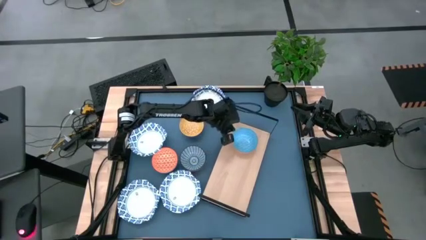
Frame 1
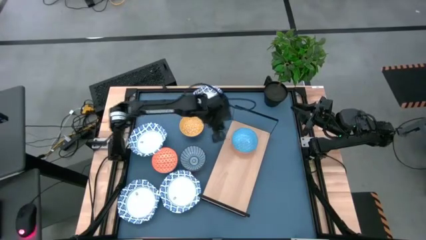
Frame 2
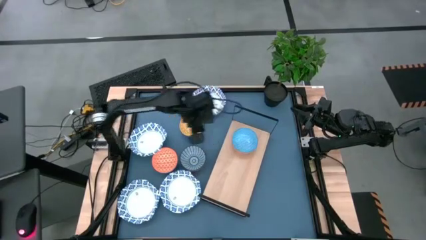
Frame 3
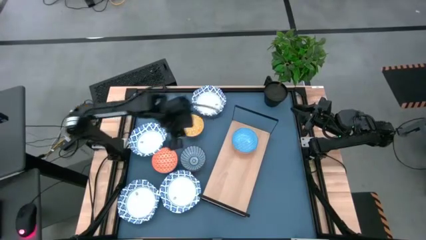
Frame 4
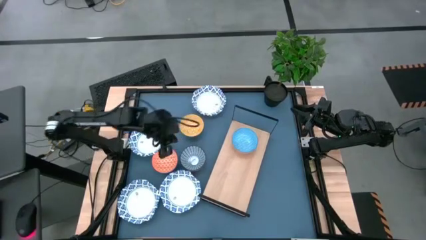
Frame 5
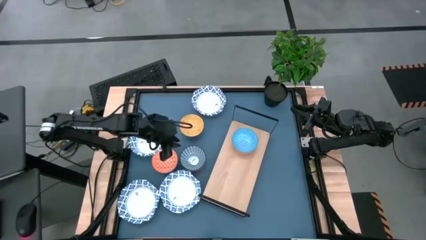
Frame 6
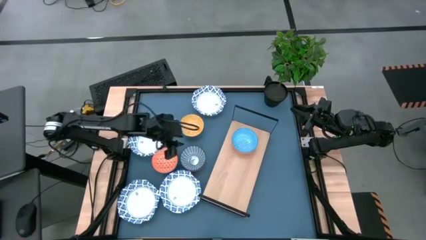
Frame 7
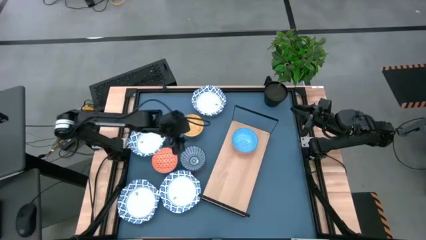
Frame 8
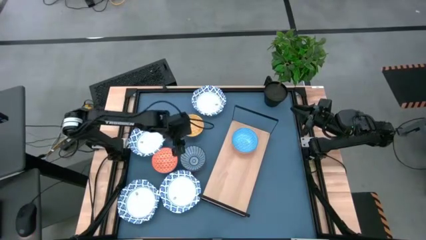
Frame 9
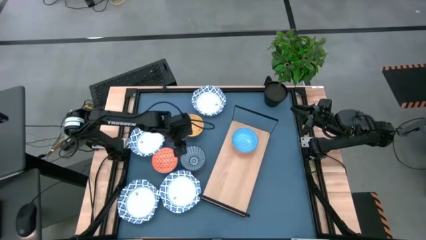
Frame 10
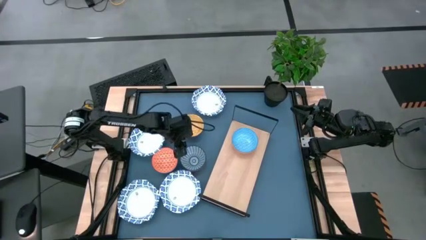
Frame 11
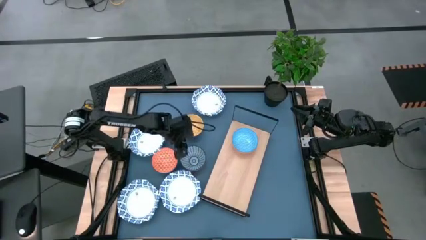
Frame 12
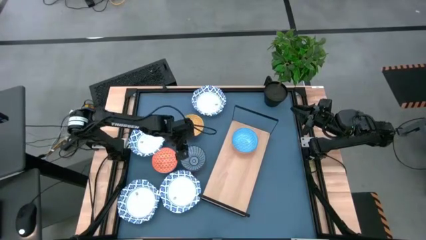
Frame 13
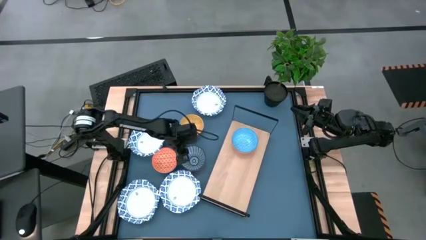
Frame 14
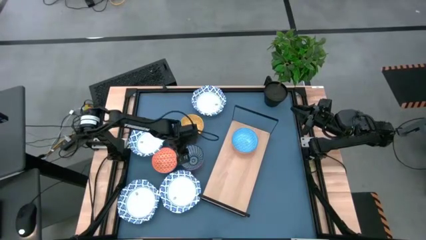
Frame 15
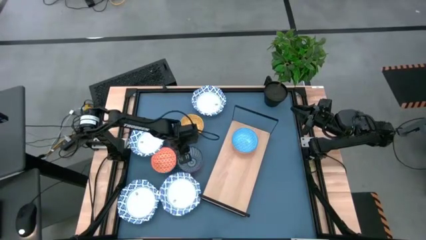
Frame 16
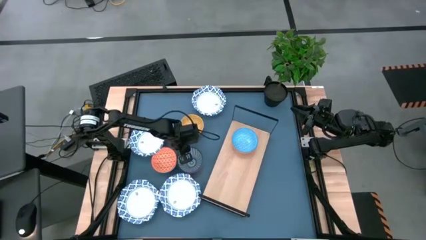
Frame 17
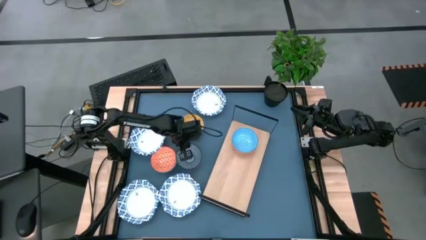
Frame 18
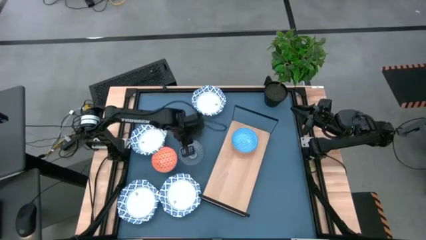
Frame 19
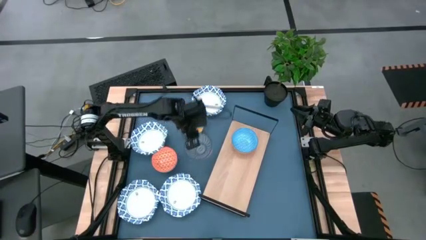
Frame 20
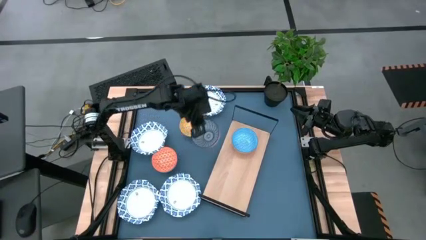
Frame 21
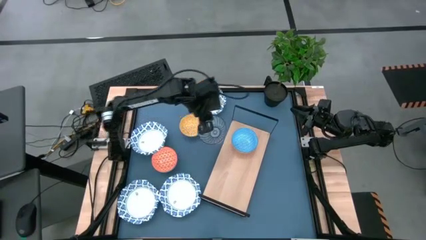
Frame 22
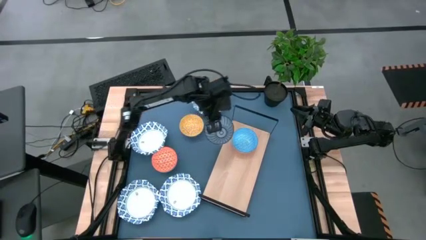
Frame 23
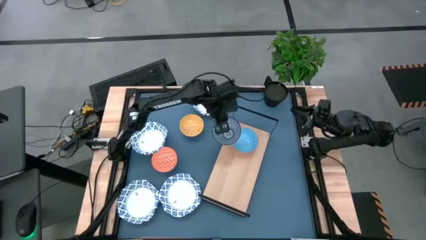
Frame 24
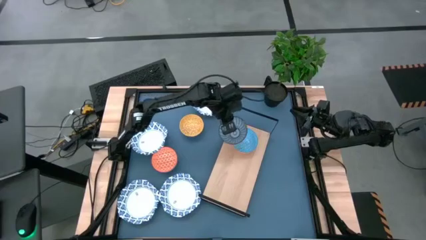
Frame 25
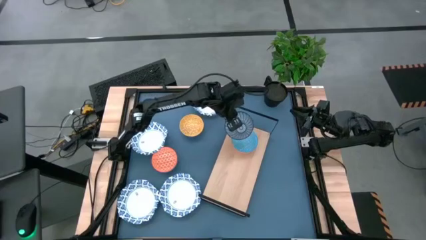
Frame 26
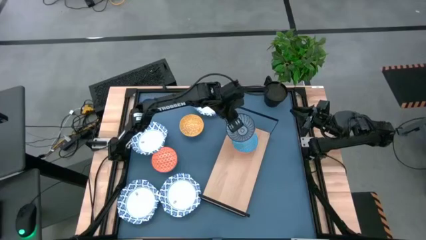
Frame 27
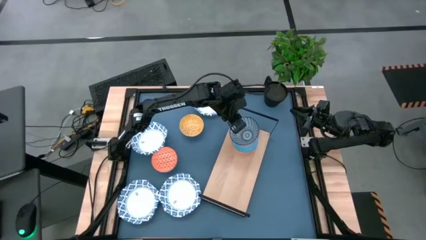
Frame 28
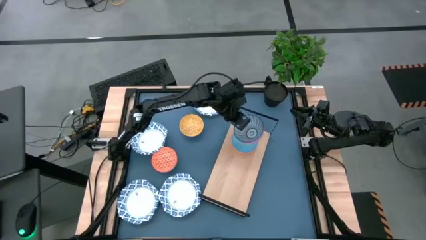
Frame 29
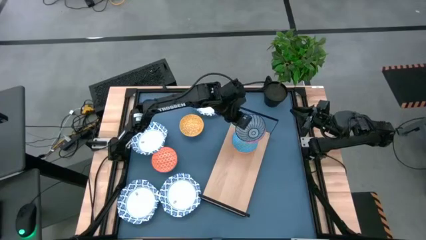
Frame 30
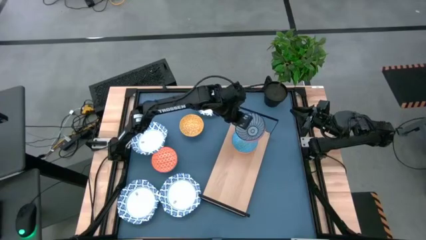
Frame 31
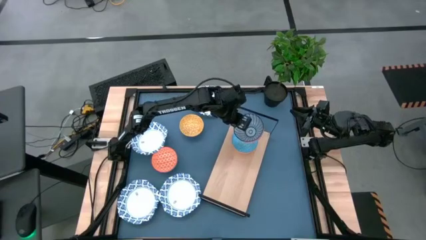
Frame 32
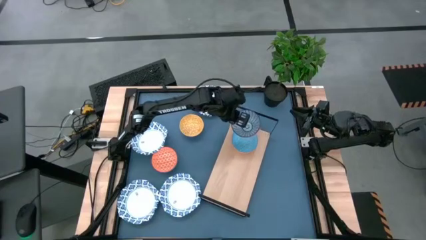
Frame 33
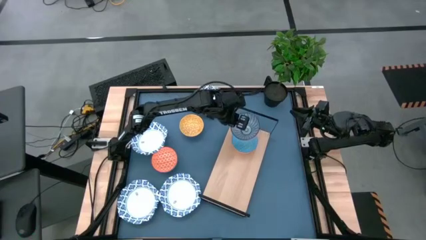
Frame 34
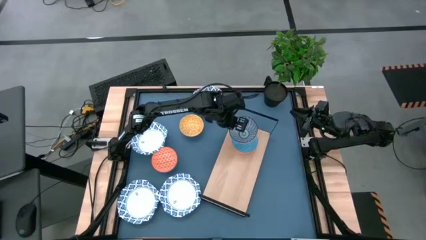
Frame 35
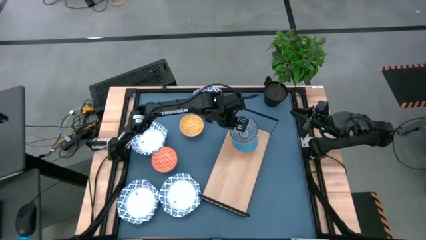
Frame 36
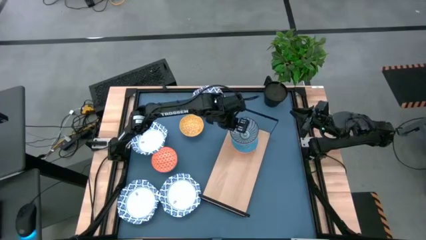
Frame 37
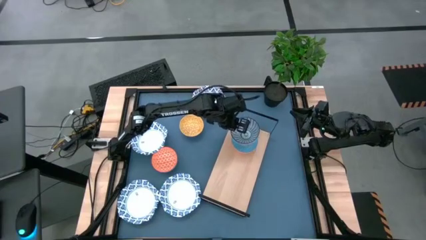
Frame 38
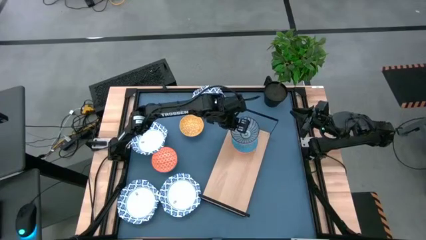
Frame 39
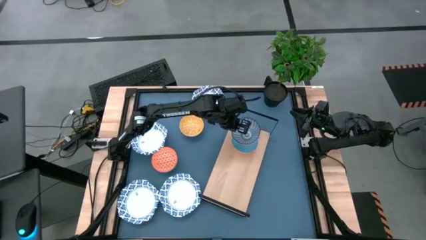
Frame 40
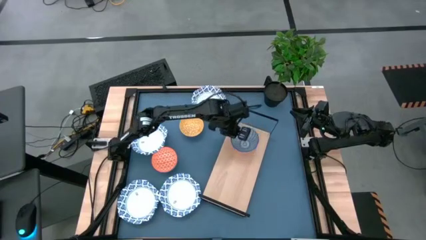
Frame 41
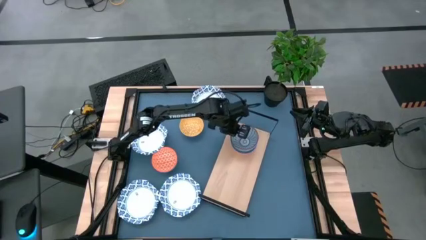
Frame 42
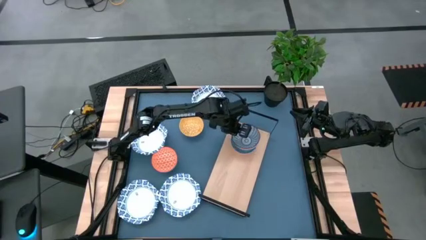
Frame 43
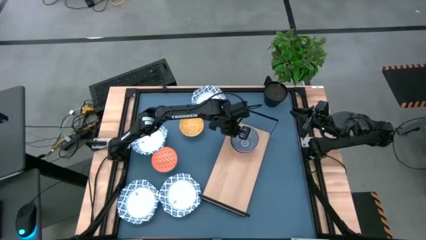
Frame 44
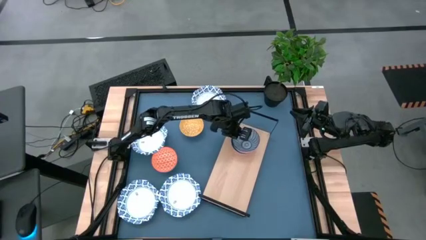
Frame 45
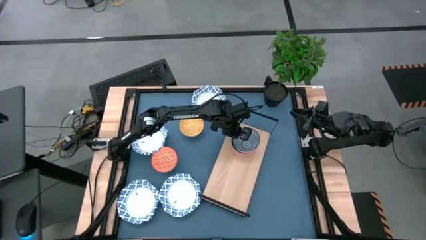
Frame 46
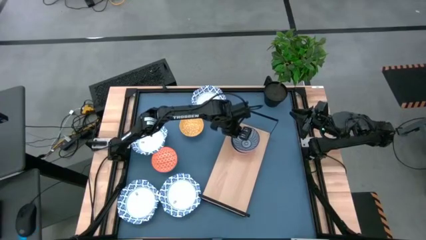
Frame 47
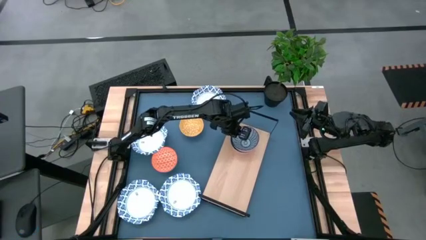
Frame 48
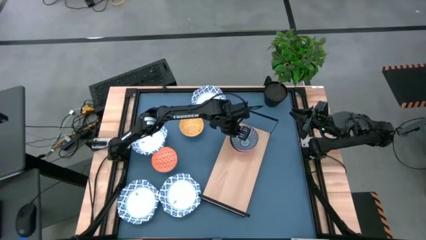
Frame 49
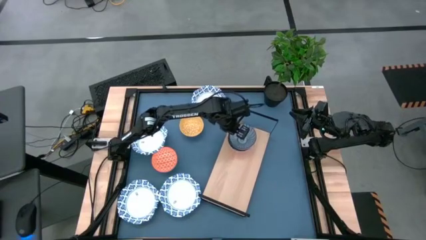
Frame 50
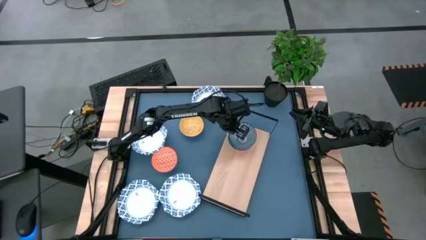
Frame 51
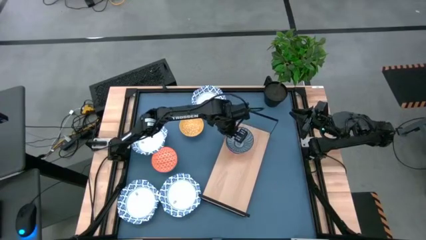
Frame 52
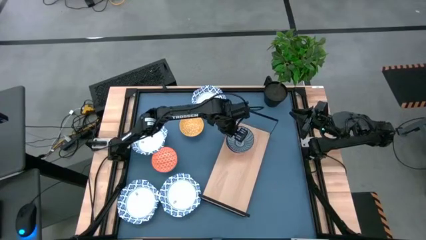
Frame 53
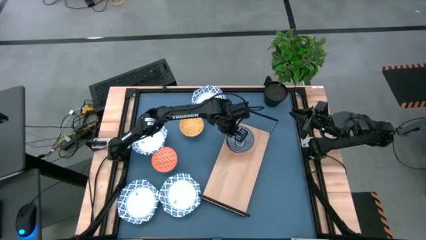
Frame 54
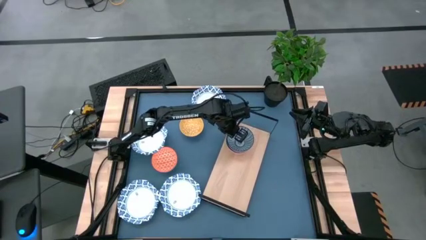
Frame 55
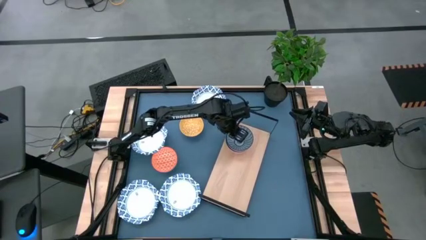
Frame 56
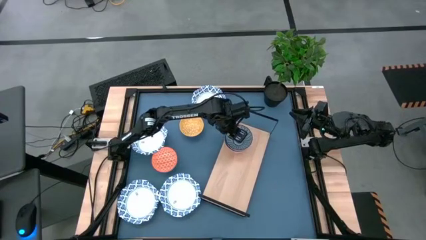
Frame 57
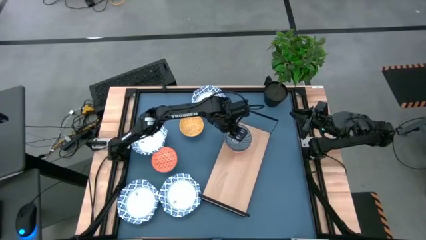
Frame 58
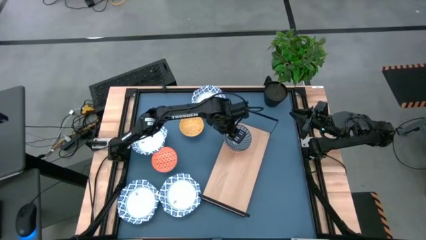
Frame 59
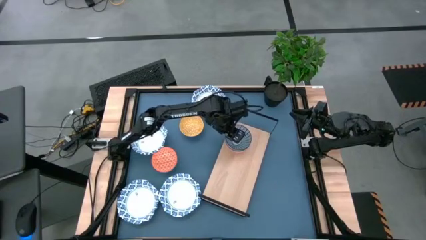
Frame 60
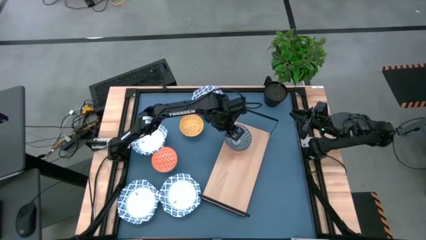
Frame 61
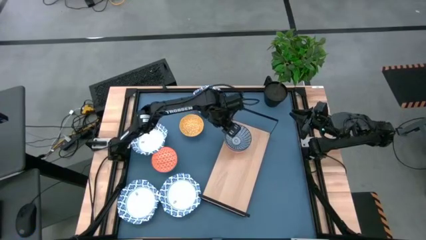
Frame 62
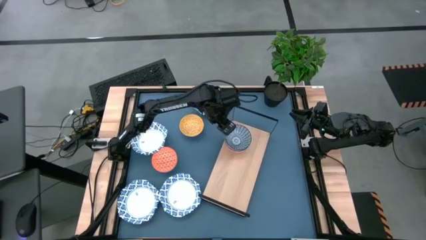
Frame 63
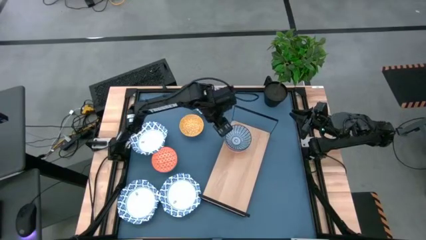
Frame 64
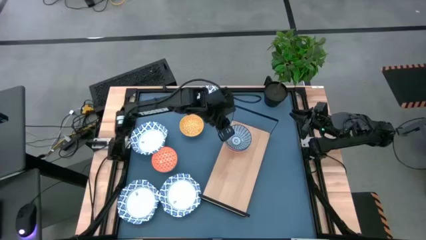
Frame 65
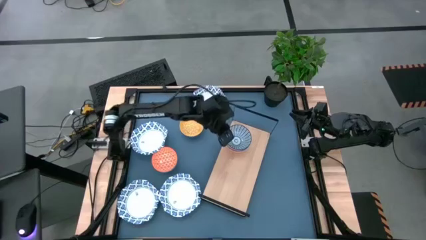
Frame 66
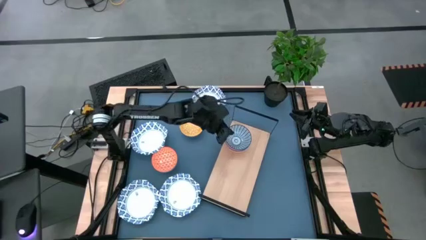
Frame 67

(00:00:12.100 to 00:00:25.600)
Task: Place and stack bowls onto a shelf
Stack the dark blue striped bowl into the light blue patterned bowl

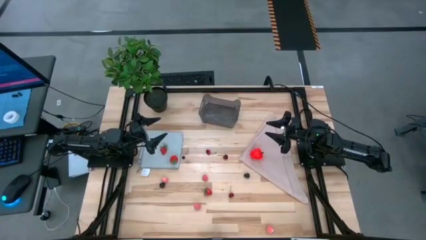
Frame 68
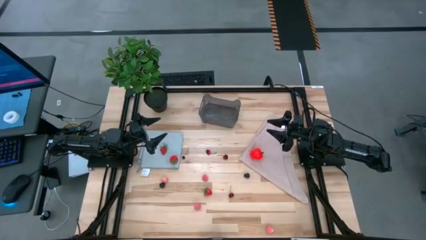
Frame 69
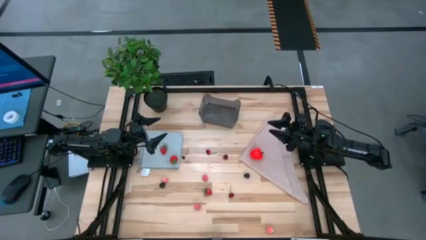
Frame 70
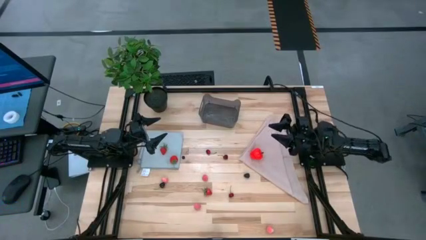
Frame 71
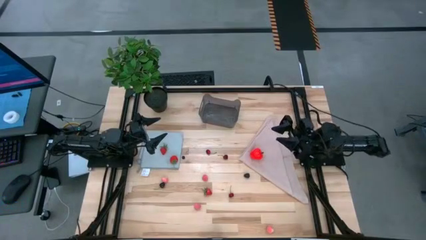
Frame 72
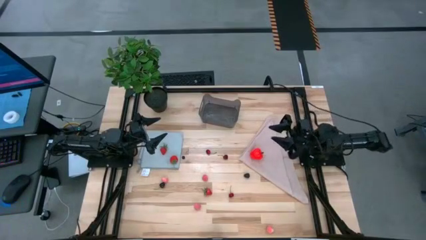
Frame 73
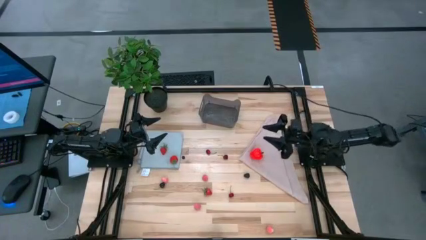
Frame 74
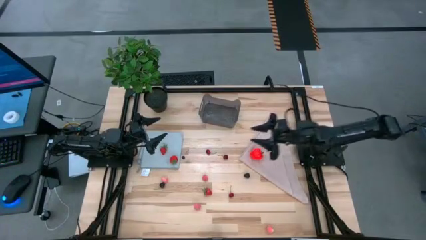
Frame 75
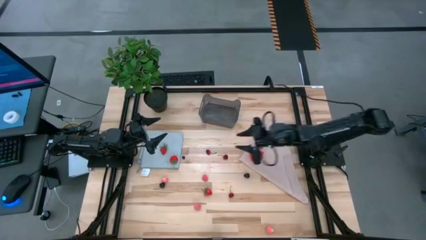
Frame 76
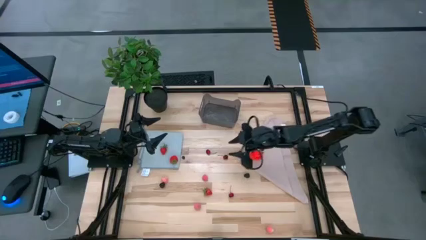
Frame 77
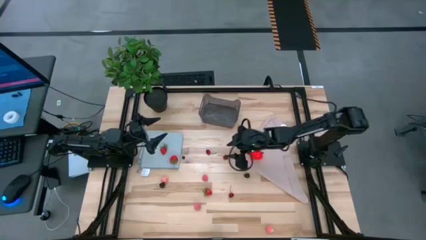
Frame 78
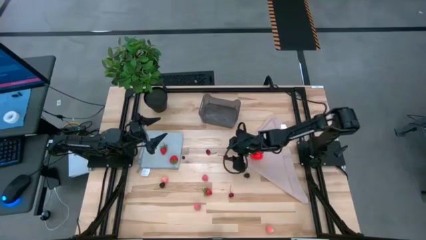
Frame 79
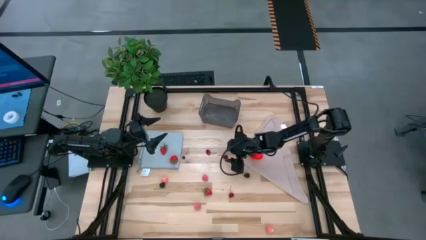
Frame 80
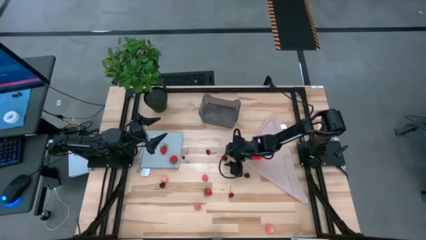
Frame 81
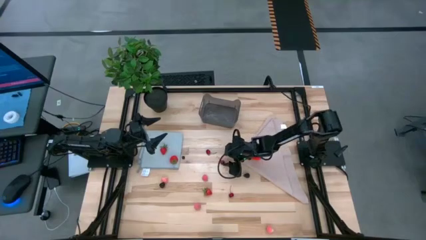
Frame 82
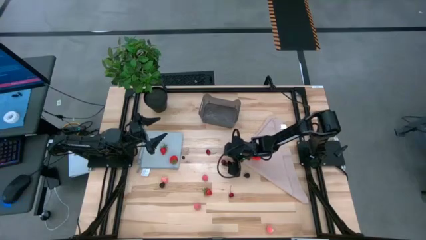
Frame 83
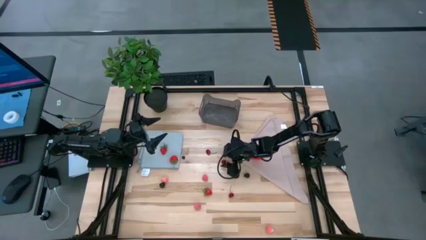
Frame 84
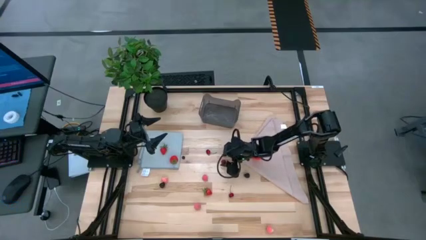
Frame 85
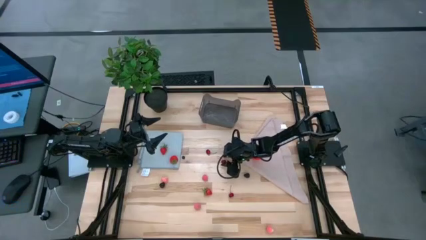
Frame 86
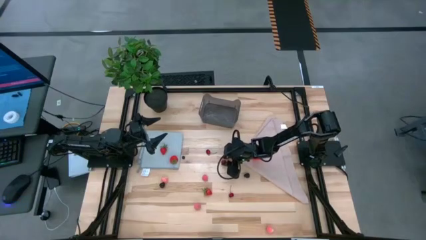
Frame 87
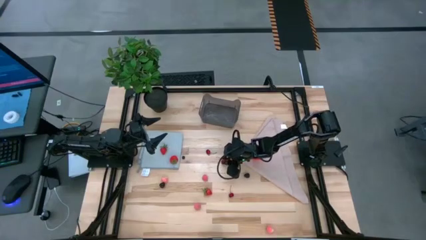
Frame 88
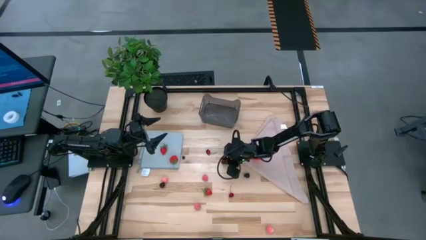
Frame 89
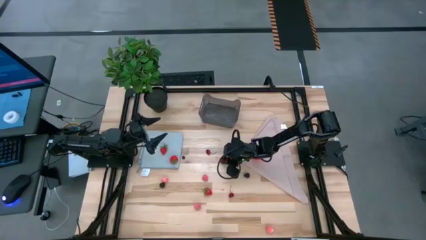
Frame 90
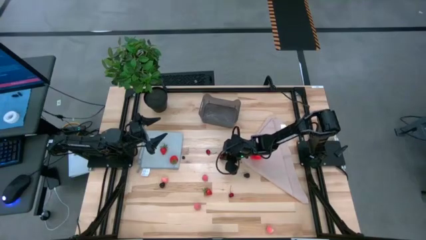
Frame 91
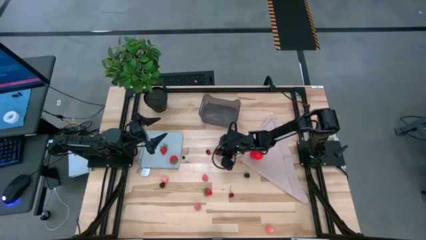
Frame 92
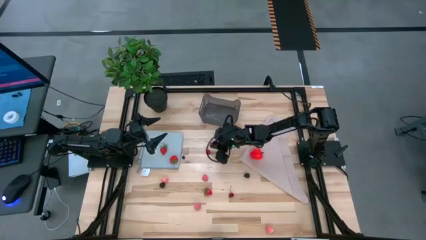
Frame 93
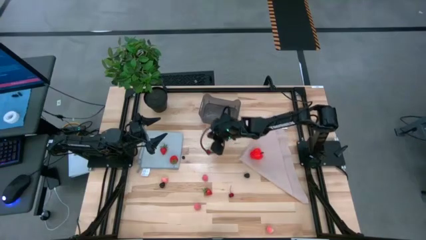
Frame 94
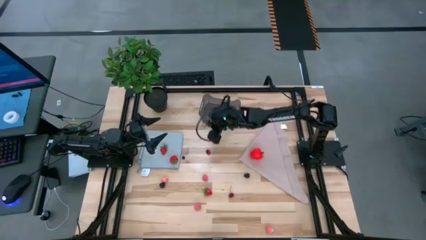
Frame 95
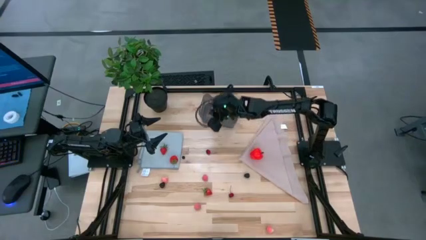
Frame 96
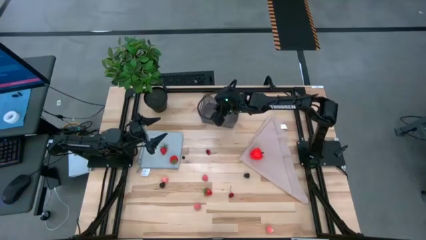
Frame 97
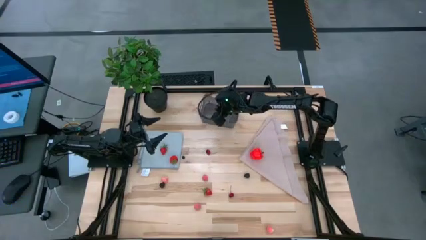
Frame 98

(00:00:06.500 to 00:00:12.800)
Task: Pick and placing Produce into tupperware
Put the red cherry into the black bin
